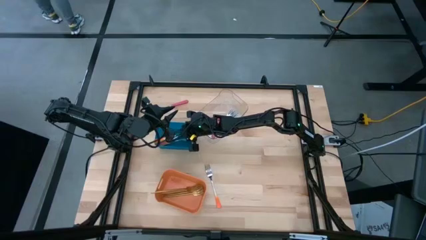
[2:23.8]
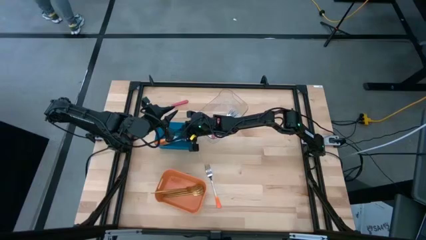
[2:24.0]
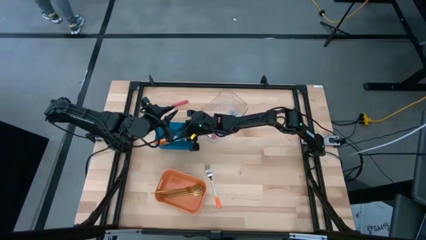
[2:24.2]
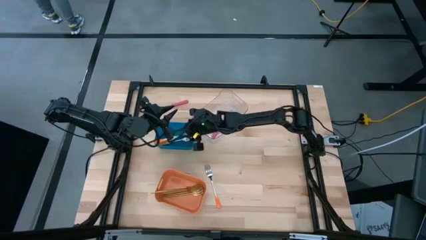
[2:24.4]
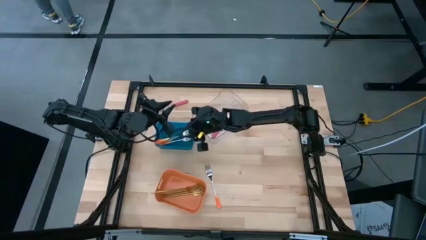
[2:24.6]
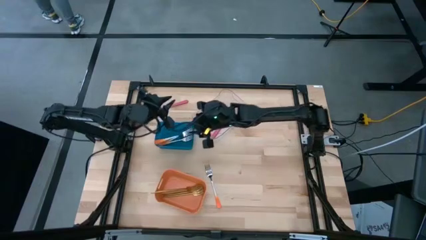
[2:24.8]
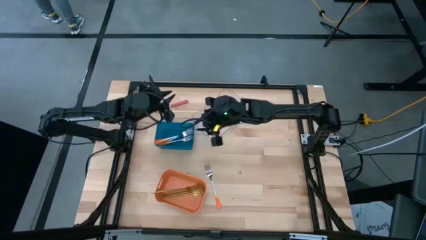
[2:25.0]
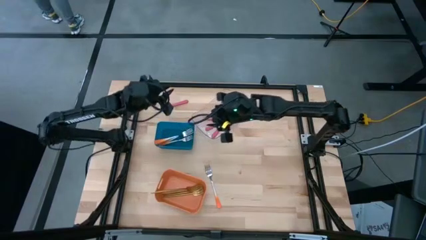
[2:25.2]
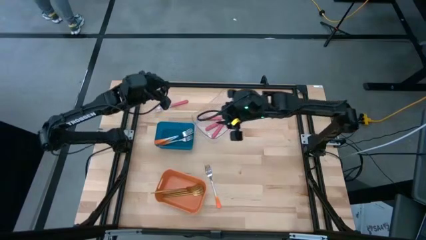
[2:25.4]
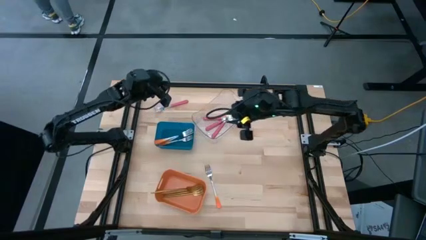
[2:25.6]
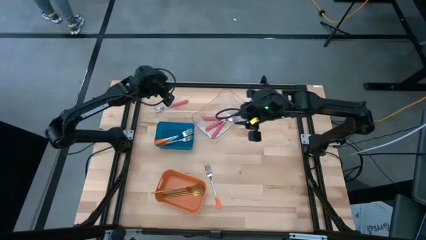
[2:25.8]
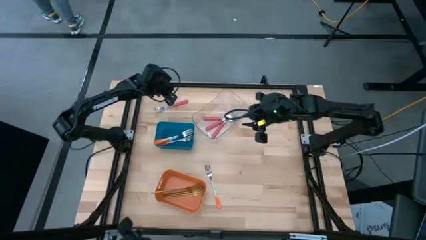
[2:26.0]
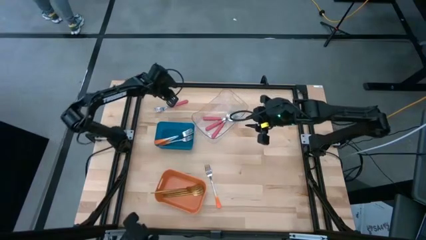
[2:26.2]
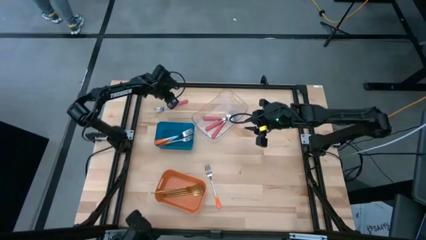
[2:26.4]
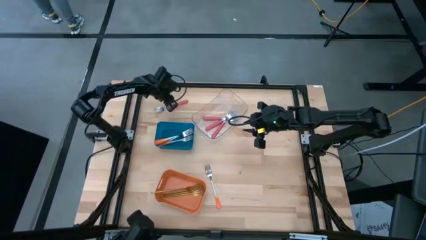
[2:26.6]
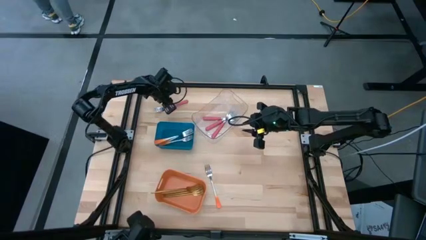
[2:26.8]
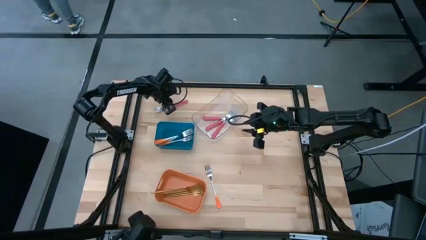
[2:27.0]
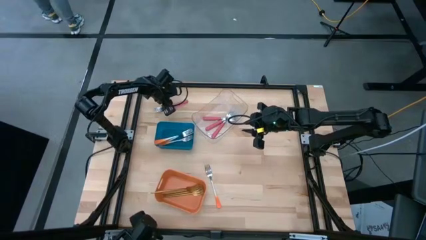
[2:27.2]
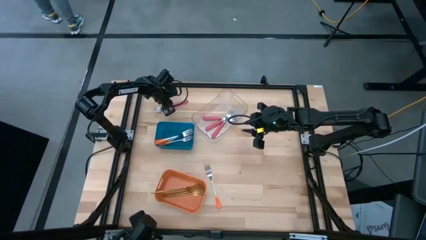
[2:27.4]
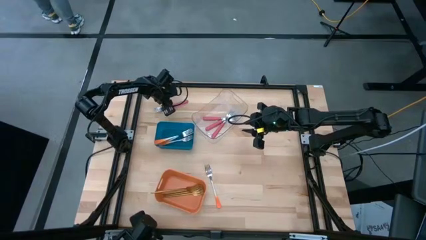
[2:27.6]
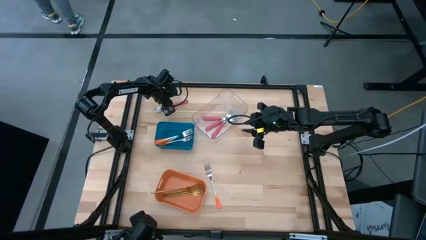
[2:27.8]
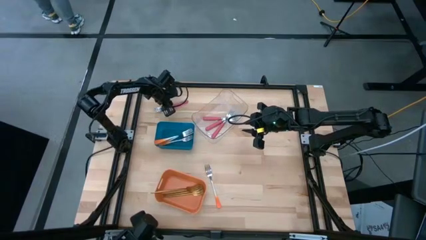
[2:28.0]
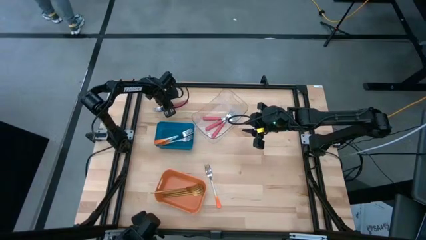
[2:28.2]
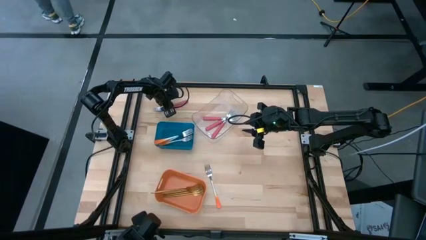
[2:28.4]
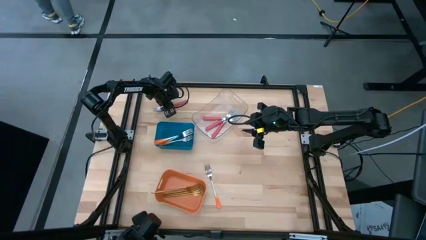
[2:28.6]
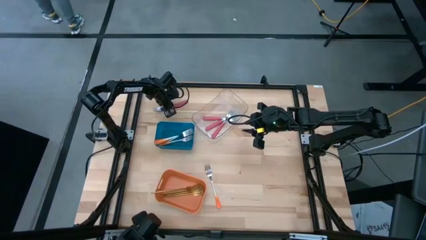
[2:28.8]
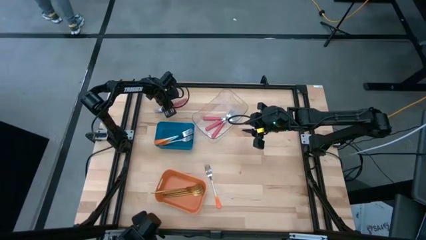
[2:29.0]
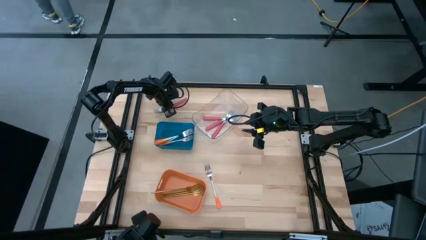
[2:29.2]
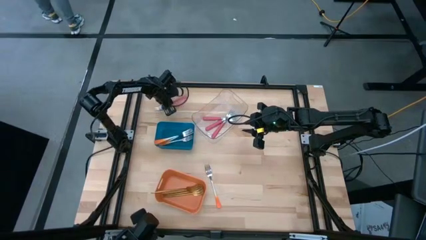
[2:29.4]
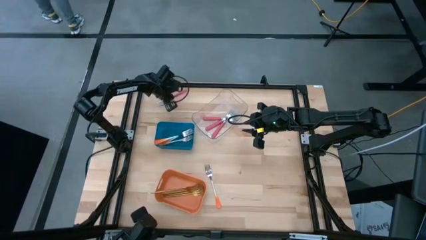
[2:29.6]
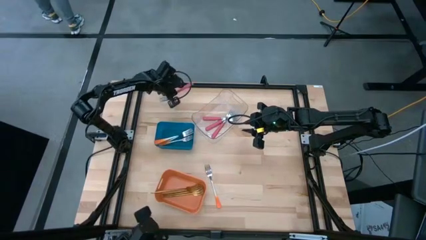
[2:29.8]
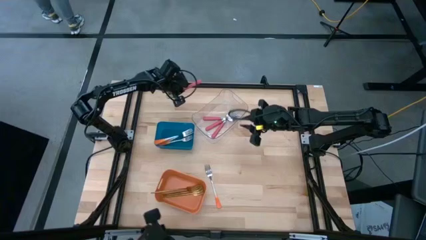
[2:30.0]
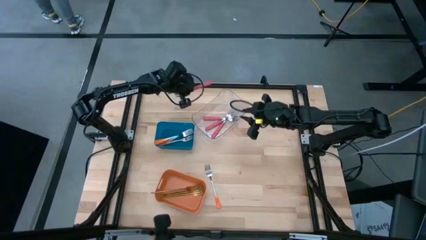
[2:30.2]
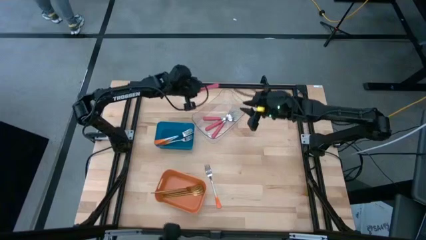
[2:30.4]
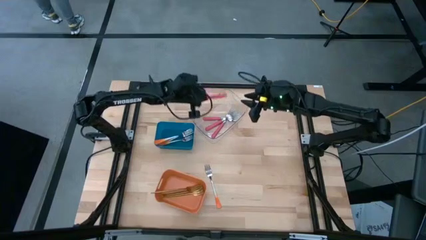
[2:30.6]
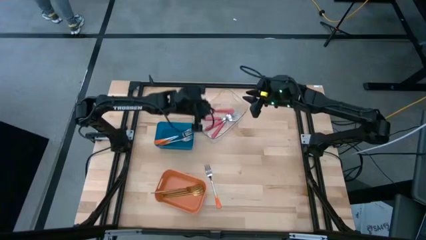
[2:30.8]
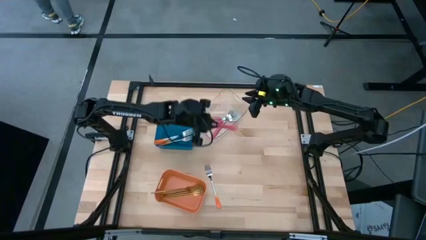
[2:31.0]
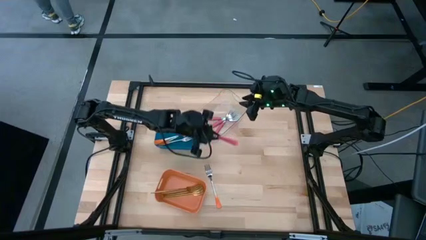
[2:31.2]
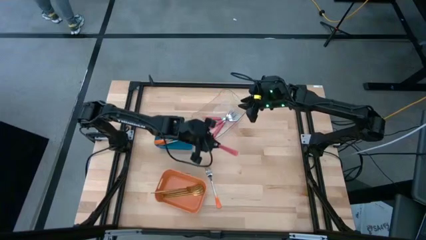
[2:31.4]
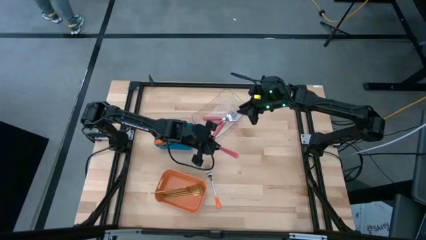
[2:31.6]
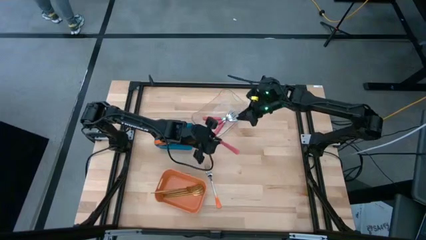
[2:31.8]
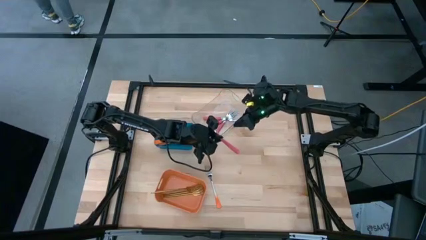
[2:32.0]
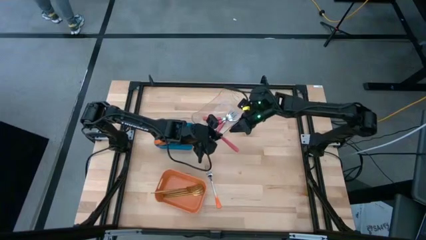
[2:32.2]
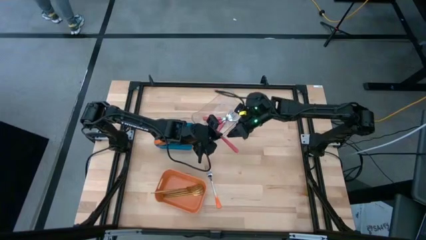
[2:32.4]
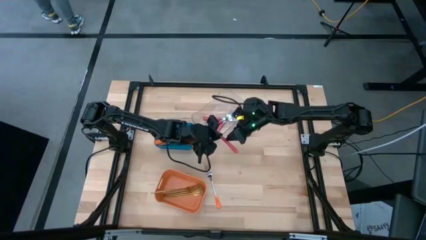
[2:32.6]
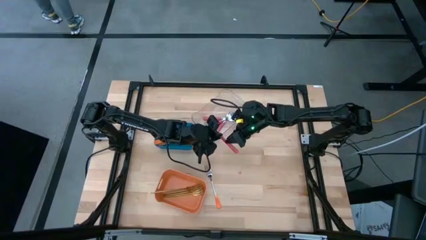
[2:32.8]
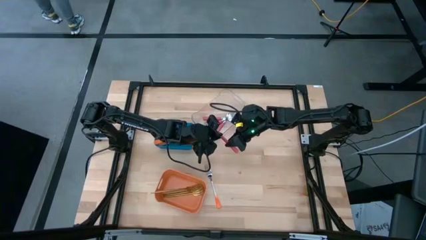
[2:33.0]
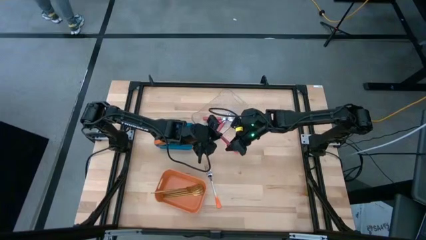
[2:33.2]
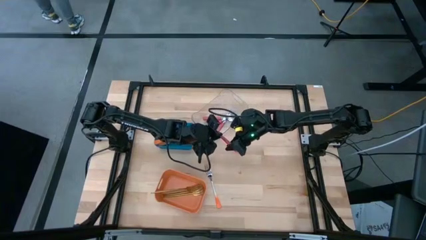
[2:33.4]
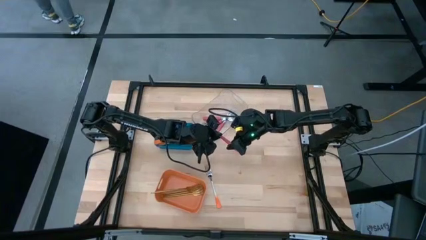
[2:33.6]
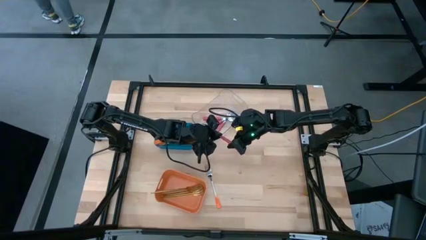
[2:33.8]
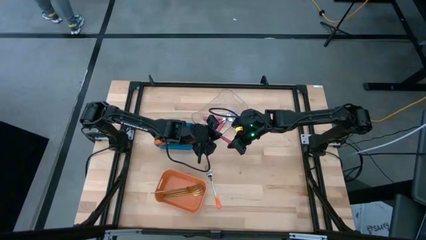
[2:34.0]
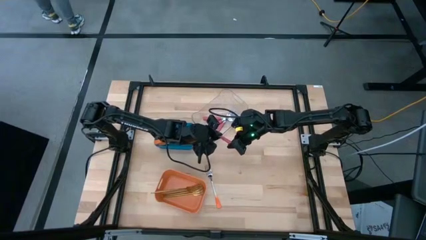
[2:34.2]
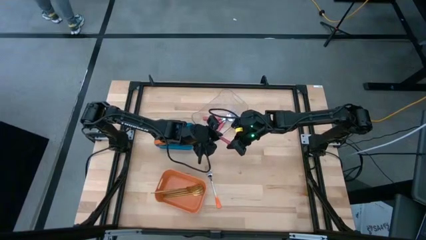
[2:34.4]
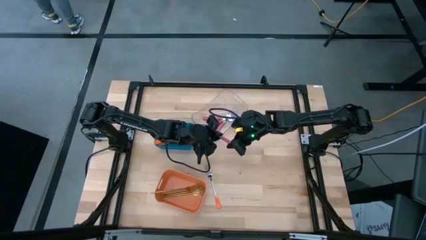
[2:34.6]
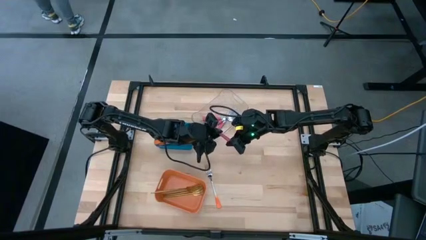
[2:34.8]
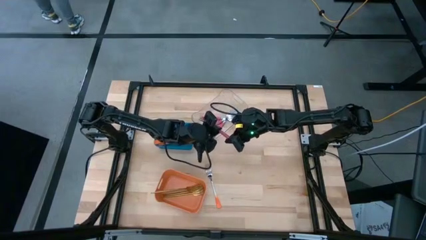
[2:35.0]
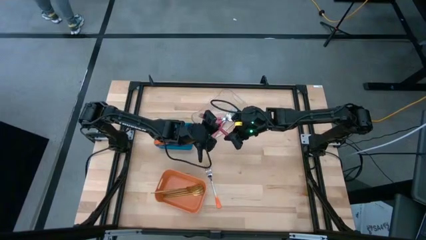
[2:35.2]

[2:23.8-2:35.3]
Task: Sort silverware by color (type)
Put the pink fork into the transparent bin

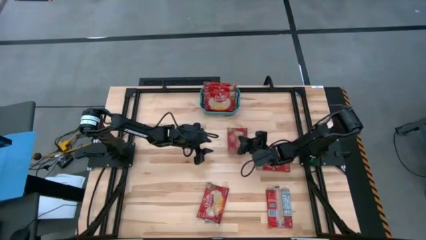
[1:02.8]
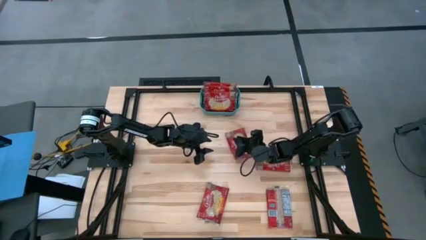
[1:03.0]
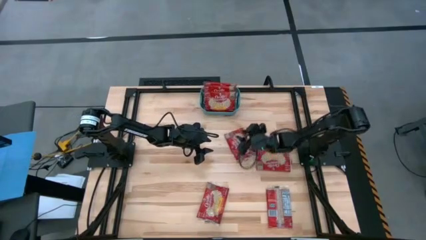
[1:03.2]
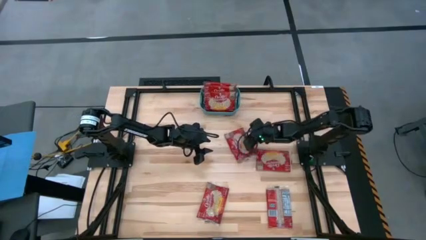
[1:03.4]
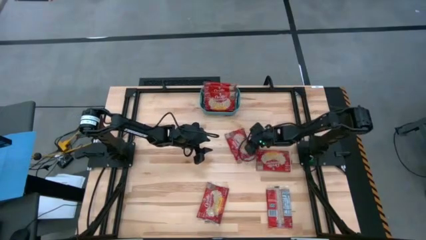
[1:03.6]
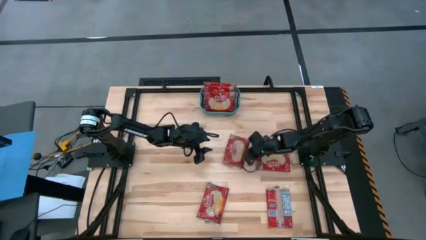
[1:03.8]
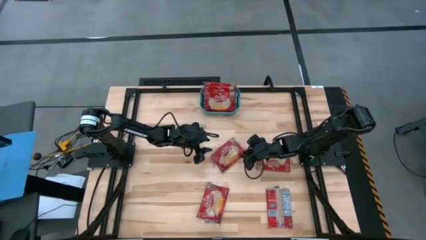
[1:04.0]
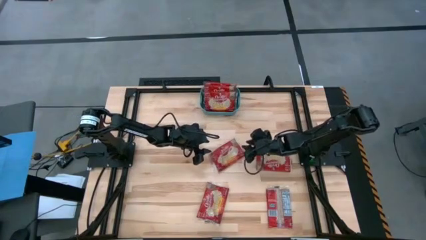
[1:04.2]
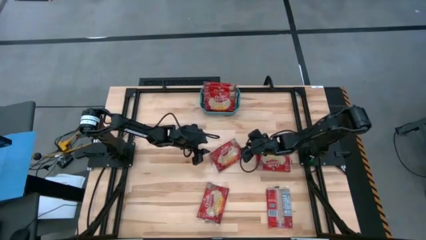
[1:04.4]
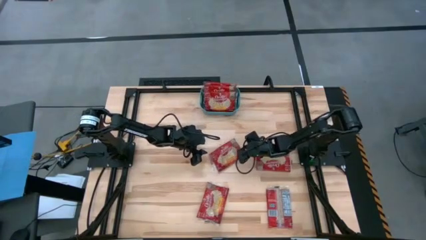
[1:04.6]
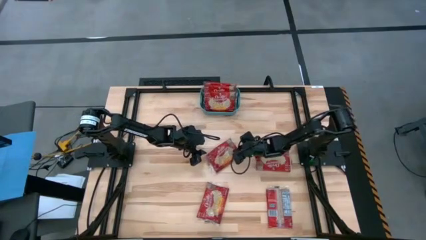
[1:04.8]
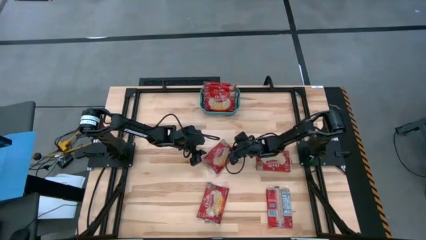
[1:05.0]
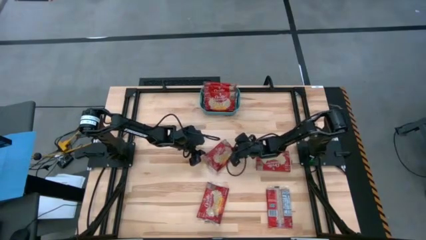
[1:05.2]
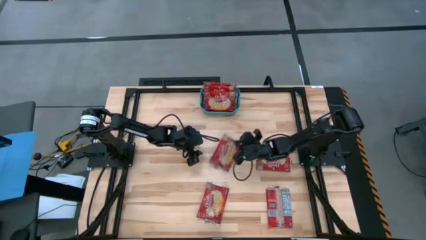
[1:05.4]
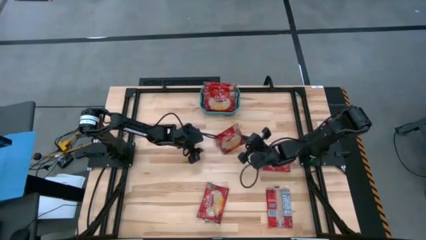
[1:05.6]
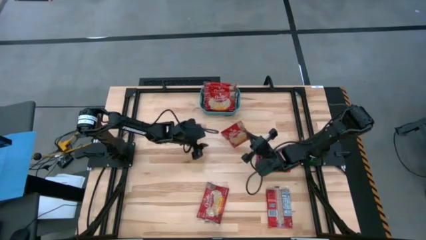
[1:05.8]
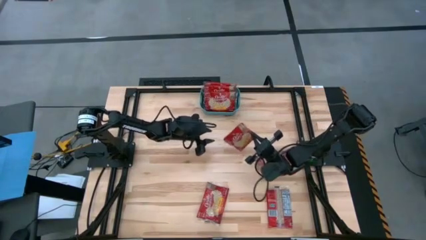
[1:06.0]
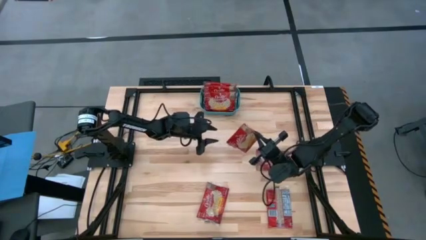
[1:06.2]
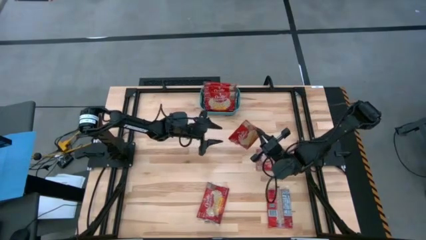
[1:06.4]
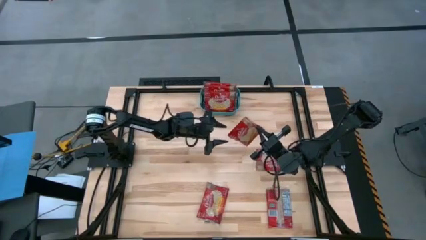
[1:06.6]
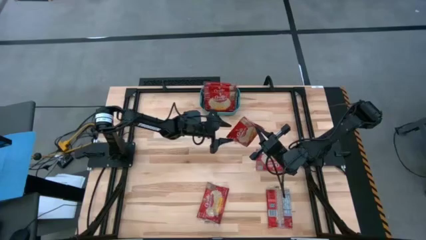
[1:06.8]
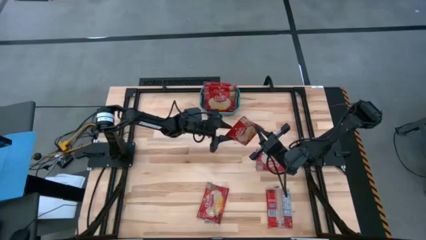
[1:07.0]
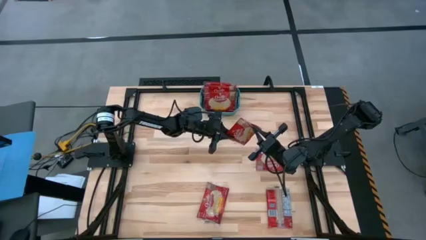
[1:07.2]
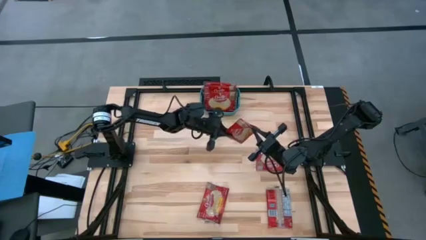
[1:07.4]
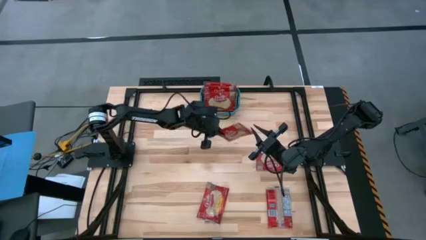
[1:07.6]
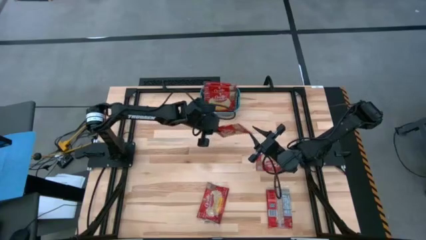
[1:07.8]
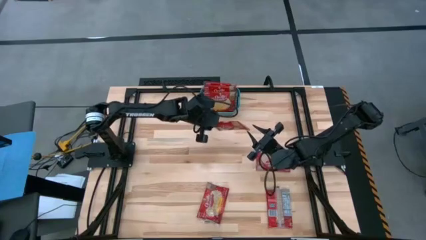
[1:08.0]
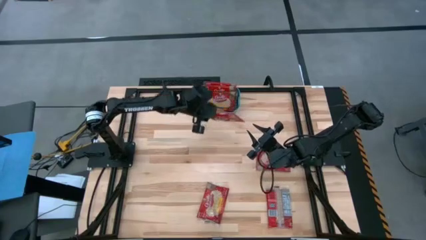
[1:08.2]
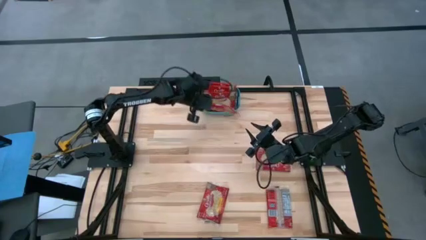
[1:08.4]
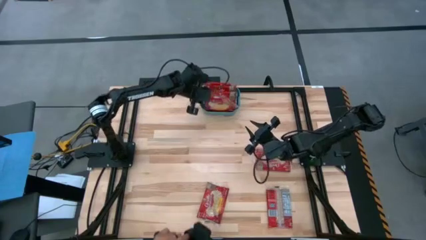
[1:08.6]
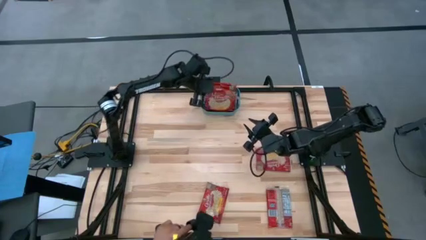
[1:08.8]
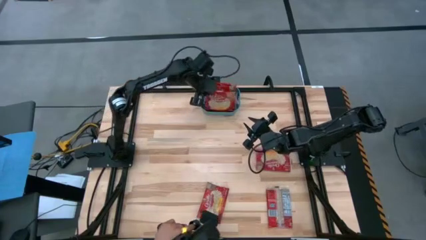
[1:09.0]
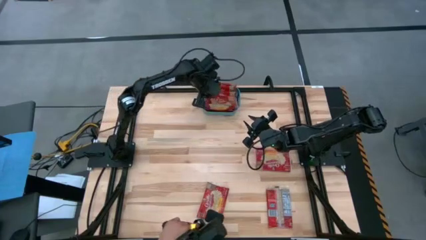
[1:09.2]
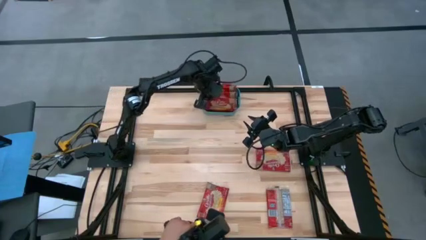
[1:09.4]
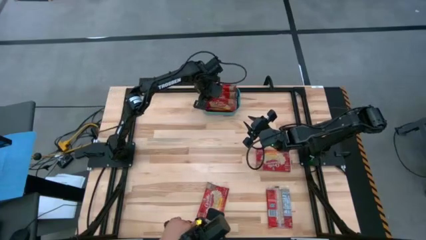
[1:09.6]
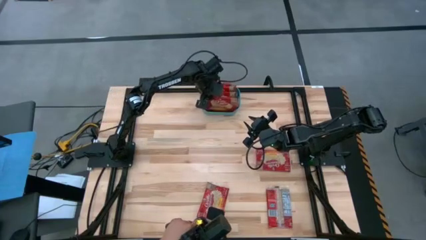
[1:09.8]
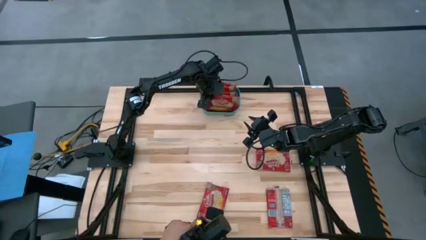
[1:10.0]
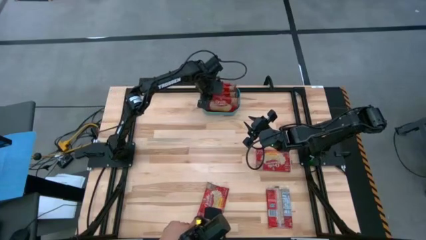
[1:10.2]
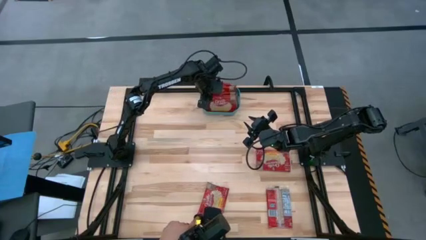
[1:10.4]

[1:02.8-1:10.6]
Task: Sort popcorn bags into baskets
Put the red popcorn bag into the blue bin
